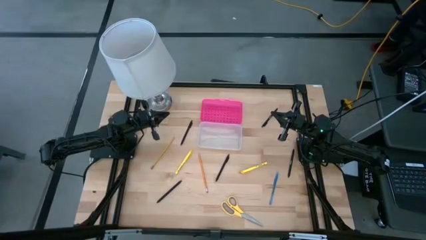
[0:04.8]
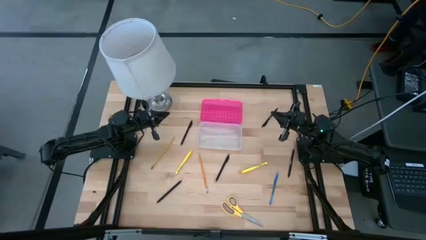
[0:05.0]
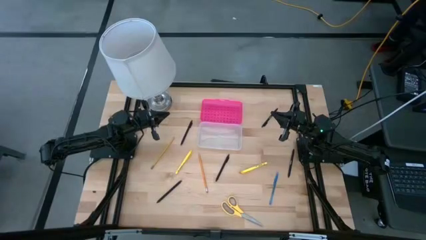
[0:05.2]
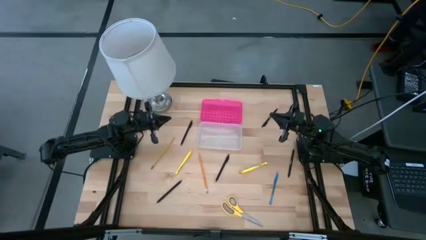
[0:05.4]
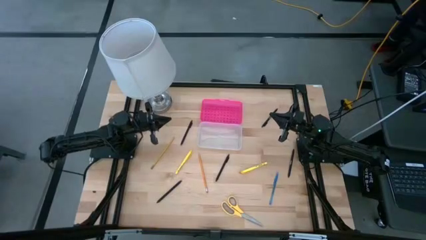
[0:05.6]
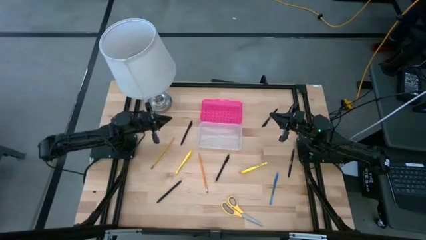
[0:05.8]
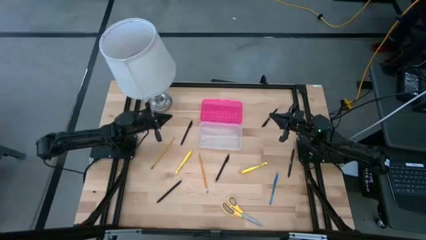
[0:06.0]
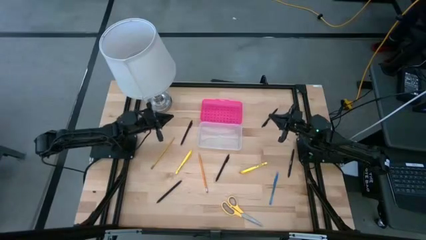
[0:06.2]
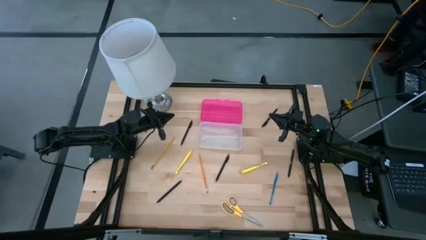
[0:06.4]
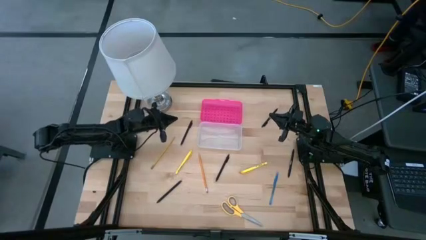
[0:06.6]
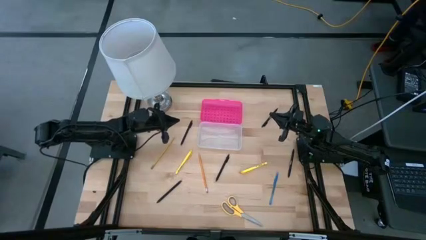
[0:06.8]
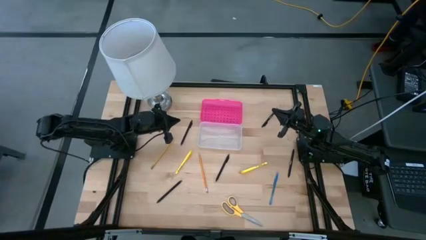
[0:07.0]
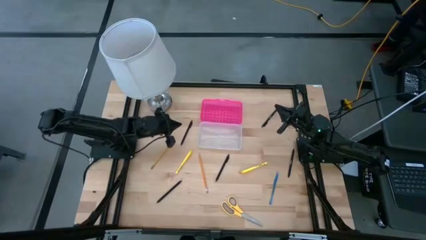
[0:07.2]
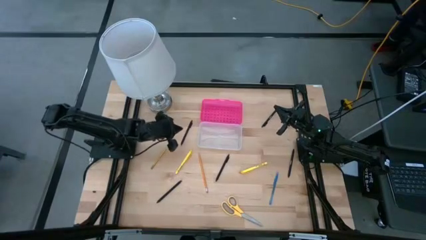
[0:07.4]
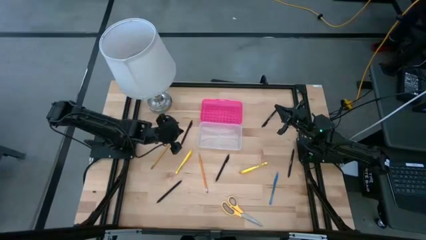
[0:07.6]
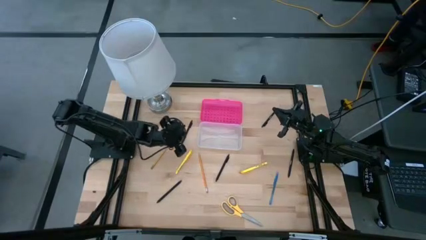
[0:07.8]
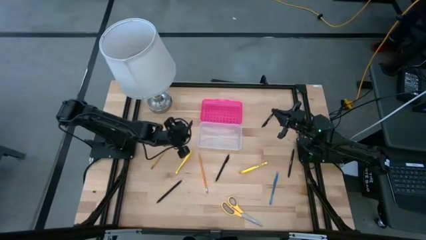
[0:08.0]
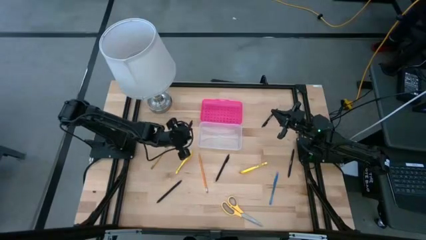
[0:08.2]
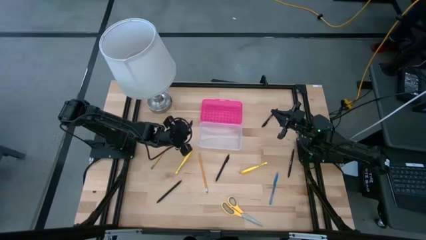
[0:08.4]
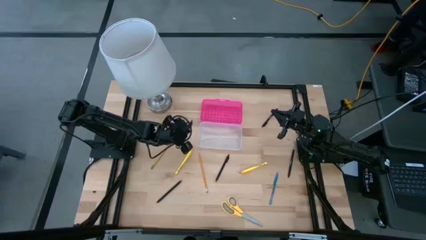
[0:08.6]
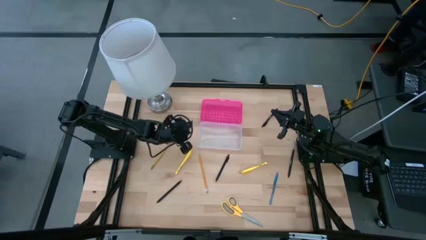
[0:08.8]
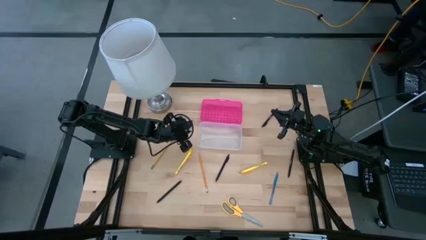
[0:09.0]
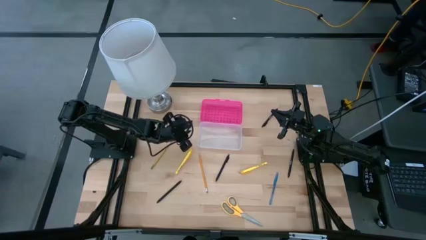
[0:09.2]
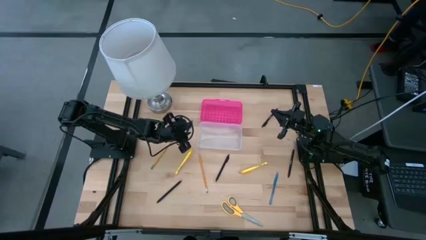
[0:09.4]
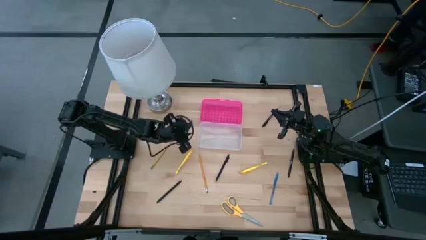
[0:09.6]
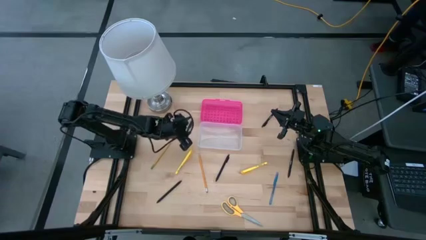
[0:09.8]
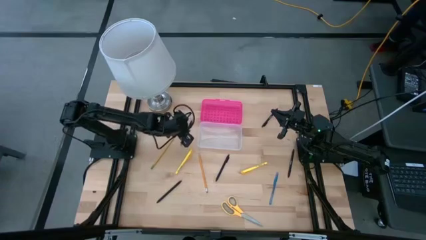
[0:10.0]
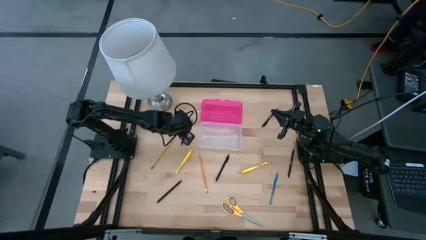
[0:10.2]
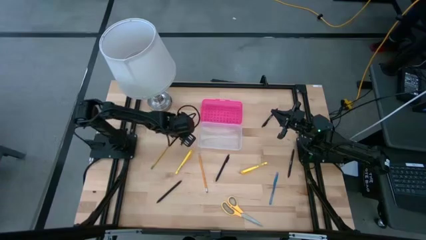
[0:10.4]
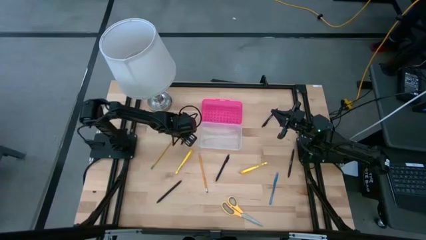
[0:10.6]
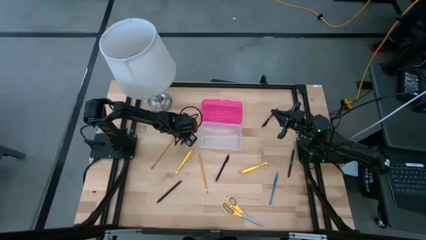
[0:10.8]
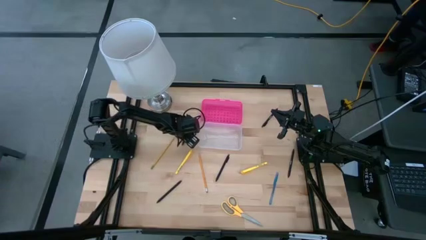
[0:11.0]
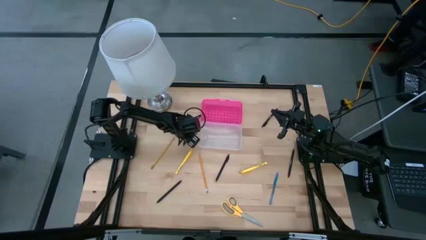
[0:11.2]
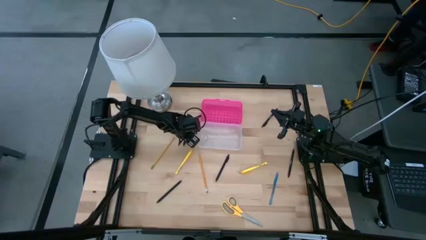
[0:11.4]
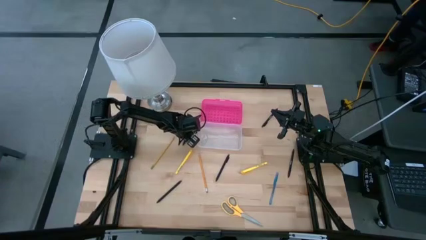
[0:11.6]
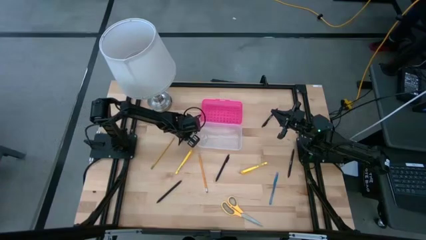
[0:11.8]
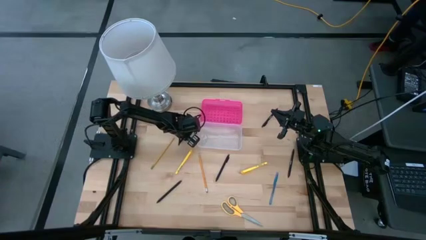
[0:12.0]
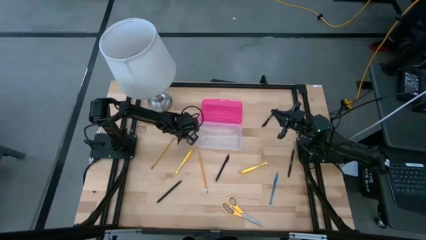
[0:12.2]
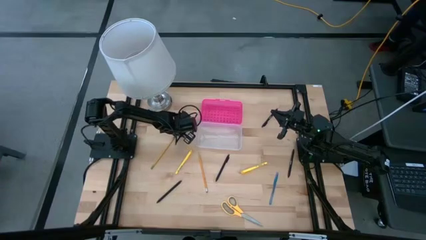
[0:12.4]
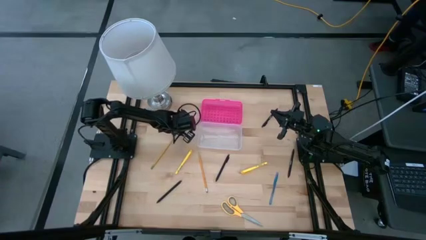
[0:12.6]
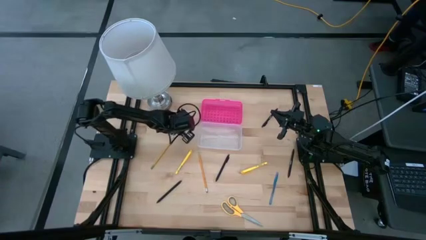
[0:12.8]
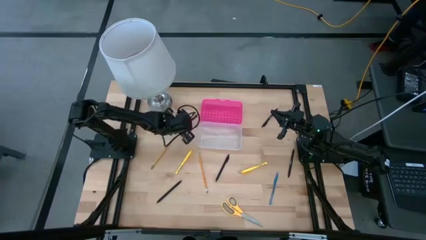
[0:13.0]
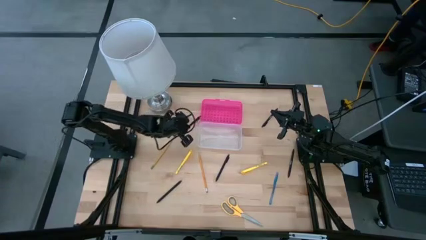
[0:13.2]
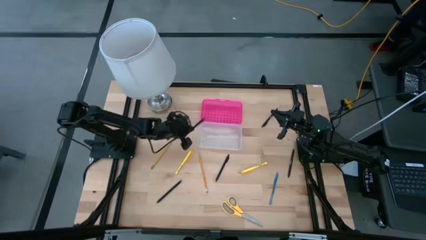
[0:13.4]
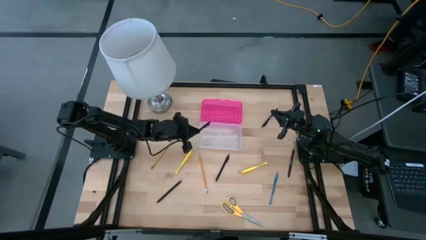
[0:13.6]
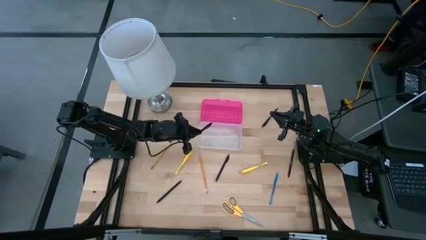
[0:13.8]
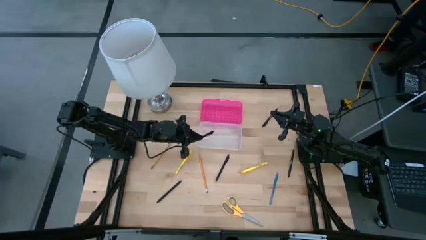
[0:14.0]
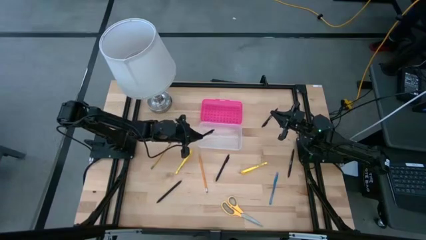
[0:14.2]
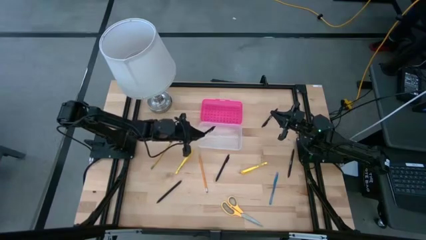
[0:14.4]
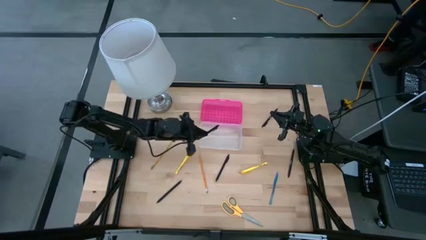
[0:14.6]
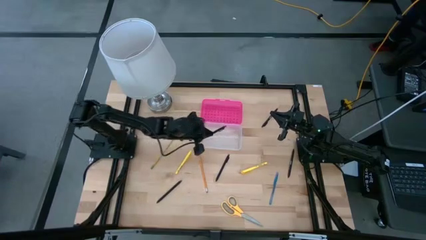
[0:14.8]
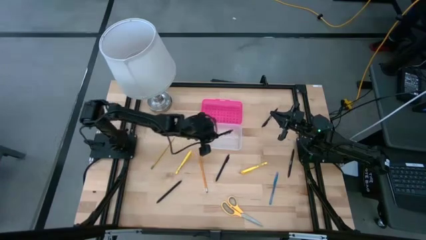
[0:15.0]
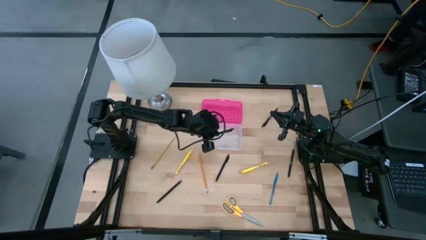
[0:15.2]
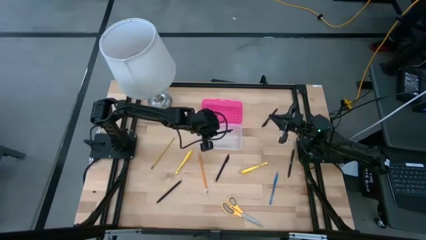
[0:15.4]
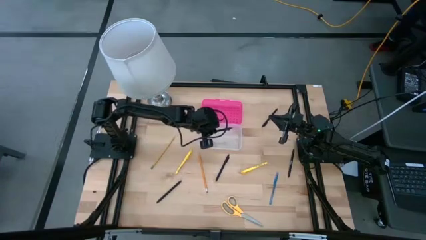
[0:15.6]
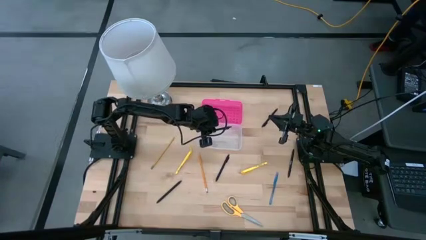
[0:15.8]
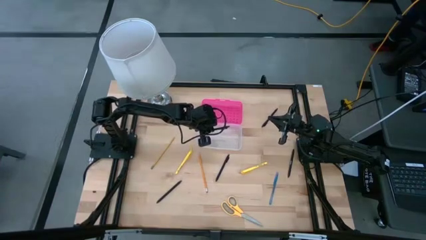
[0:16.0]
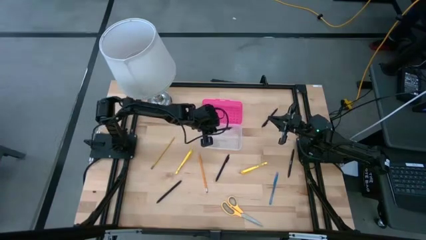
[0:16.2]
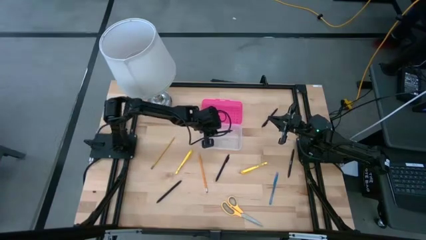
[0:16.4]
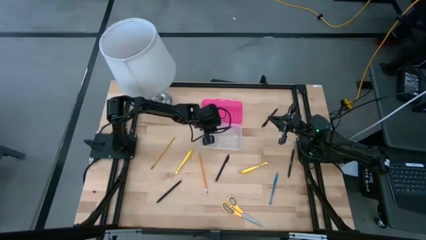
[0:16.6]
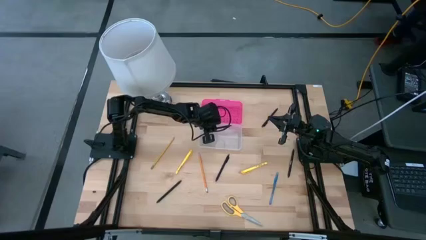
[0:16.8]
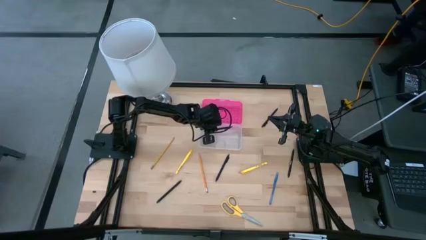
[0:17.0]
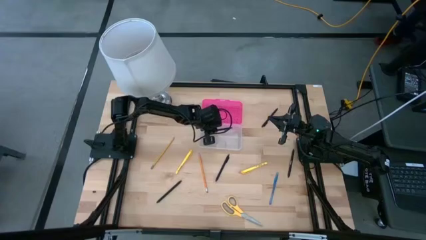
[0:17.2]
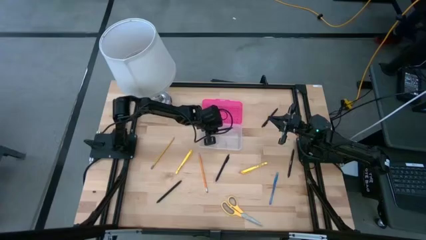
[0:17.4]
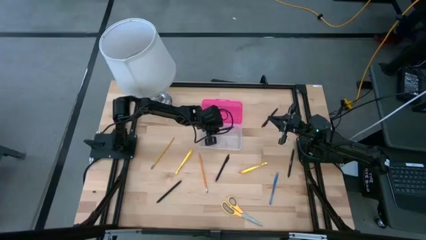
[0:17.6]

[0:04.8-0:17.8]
Task: Pick & place school supplies into a supply box
Put the black pen into the pink supply box
